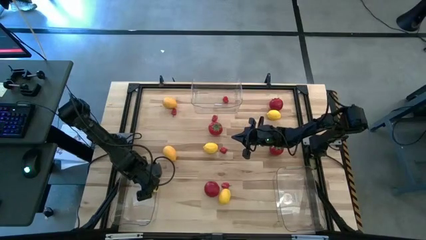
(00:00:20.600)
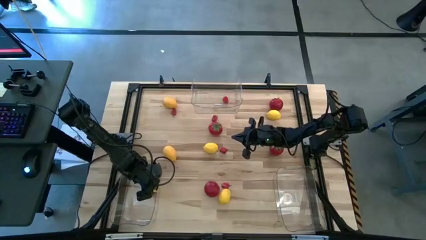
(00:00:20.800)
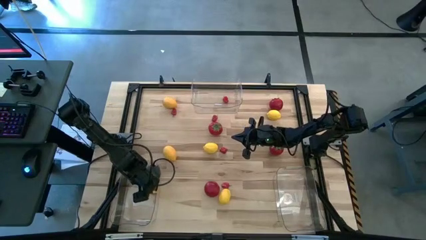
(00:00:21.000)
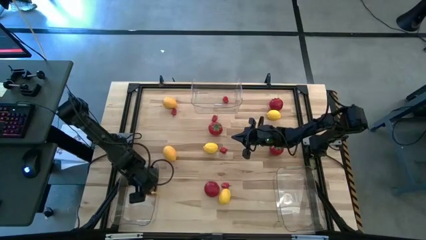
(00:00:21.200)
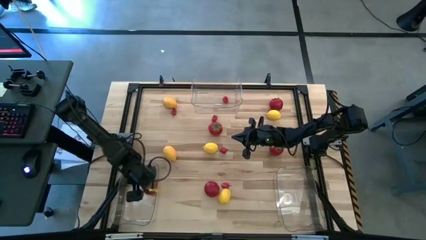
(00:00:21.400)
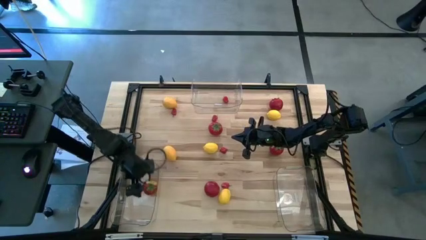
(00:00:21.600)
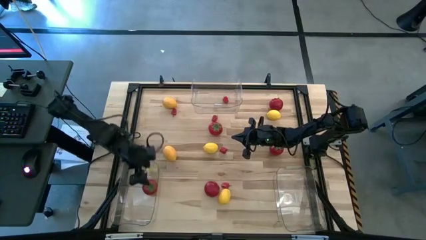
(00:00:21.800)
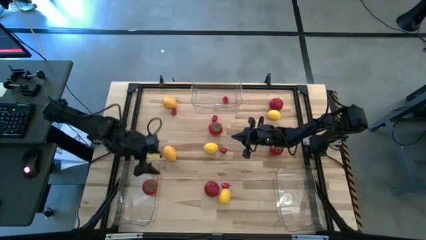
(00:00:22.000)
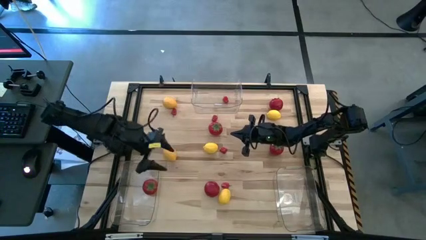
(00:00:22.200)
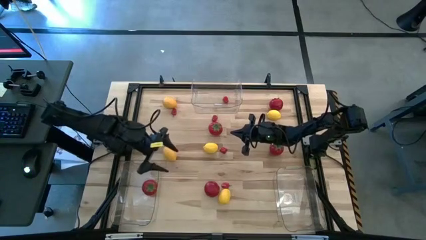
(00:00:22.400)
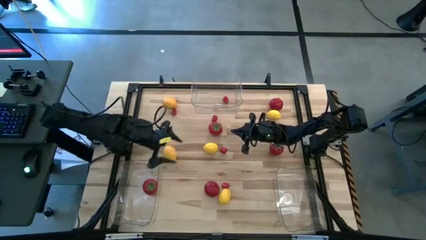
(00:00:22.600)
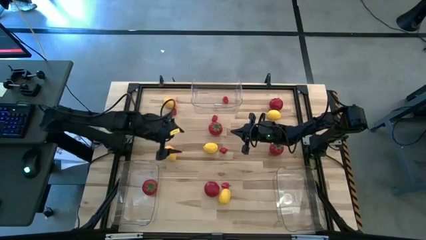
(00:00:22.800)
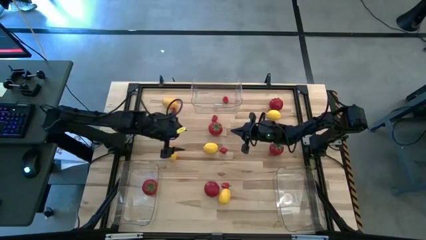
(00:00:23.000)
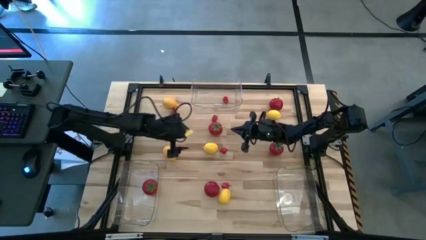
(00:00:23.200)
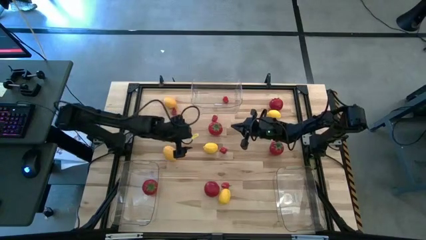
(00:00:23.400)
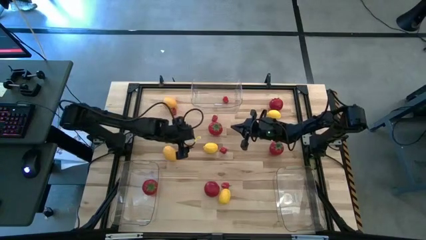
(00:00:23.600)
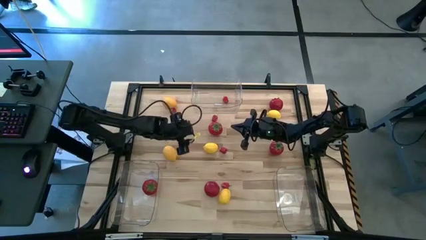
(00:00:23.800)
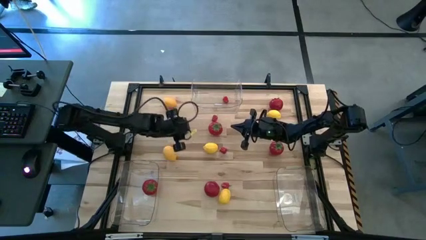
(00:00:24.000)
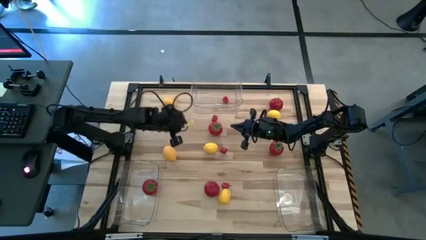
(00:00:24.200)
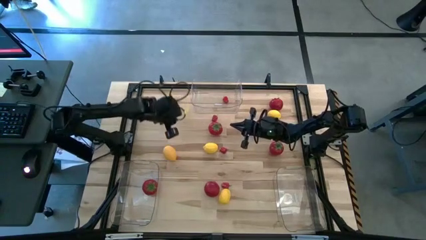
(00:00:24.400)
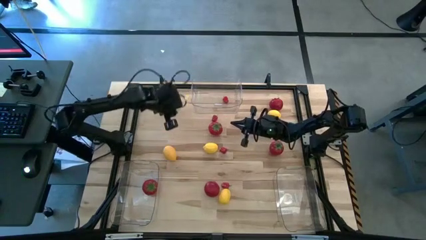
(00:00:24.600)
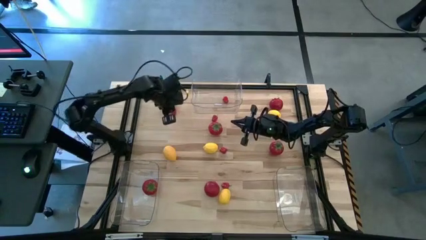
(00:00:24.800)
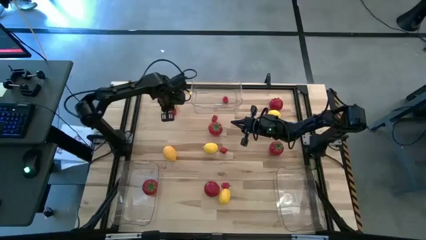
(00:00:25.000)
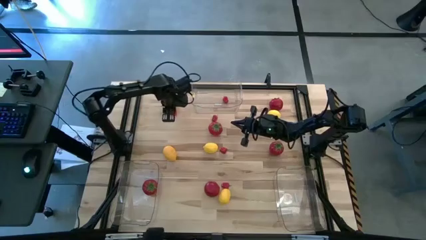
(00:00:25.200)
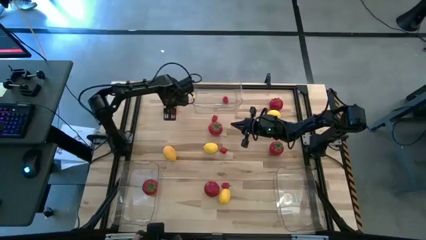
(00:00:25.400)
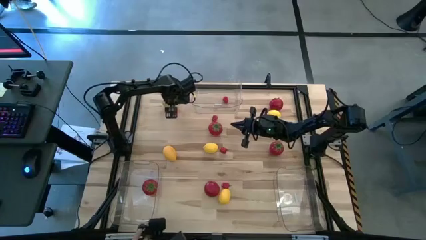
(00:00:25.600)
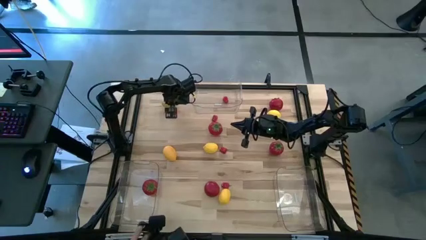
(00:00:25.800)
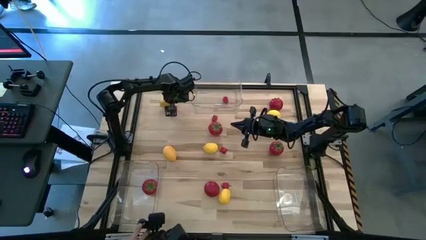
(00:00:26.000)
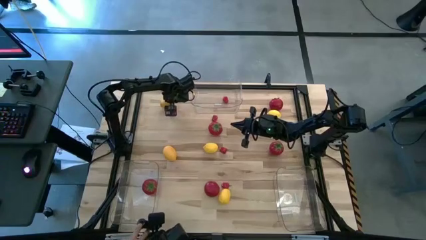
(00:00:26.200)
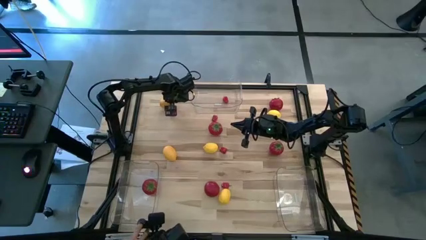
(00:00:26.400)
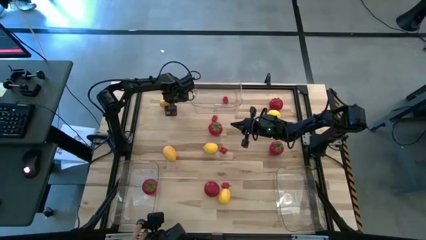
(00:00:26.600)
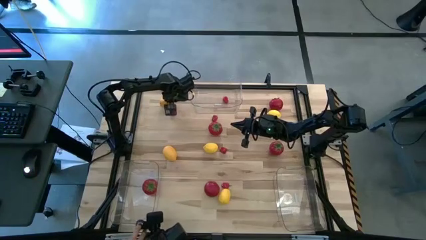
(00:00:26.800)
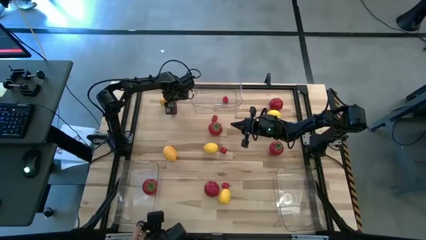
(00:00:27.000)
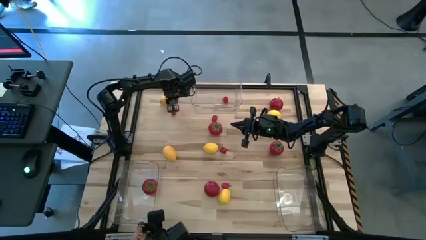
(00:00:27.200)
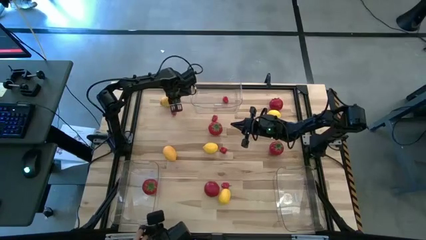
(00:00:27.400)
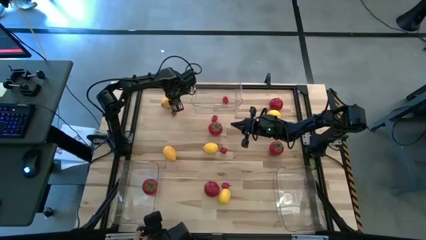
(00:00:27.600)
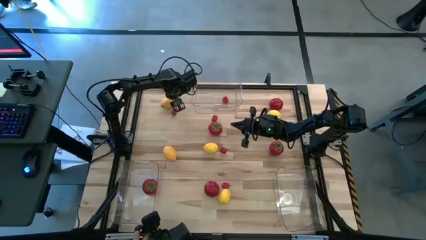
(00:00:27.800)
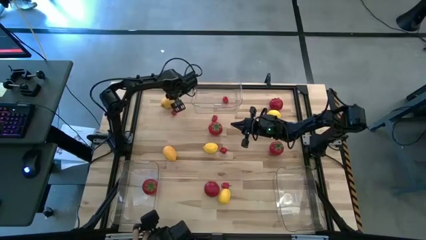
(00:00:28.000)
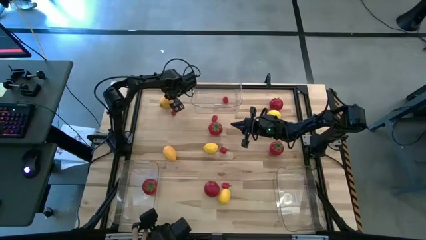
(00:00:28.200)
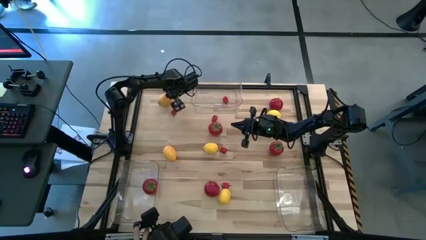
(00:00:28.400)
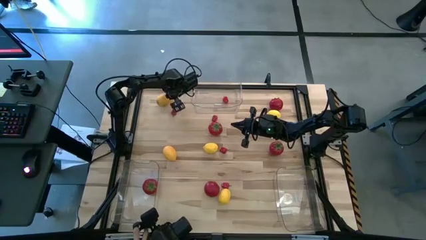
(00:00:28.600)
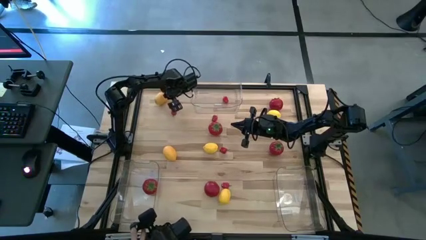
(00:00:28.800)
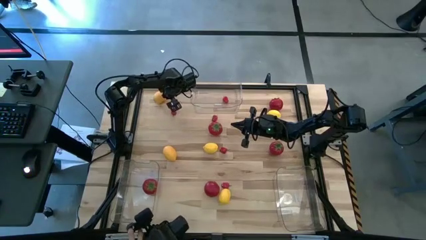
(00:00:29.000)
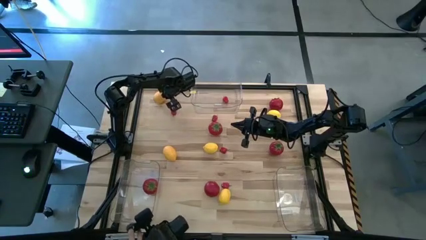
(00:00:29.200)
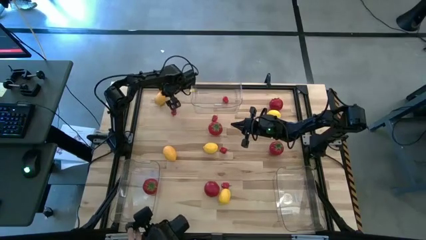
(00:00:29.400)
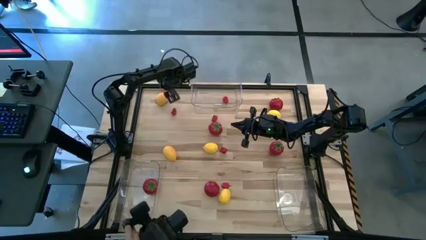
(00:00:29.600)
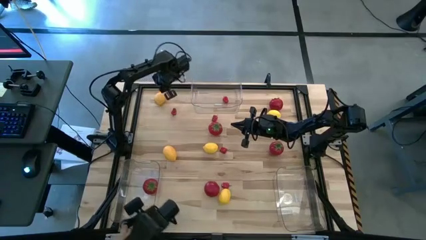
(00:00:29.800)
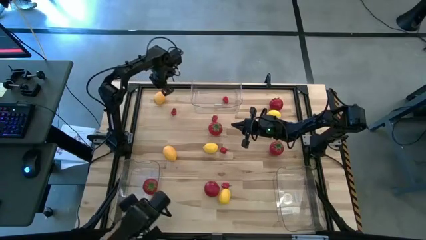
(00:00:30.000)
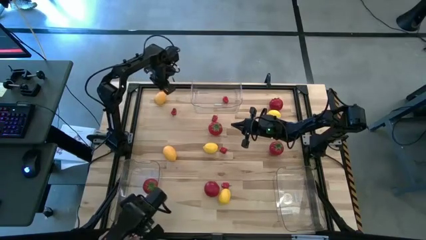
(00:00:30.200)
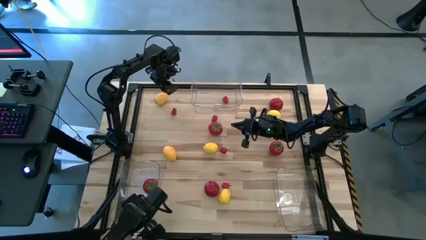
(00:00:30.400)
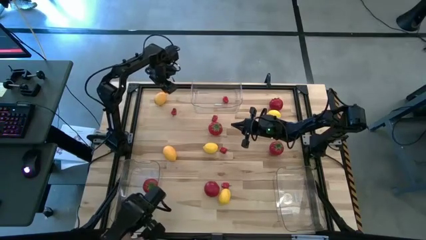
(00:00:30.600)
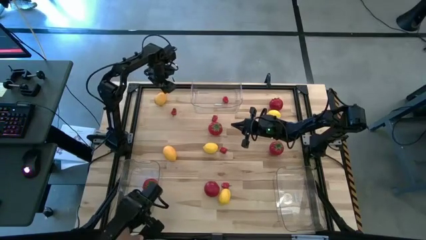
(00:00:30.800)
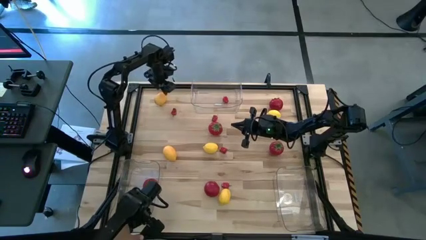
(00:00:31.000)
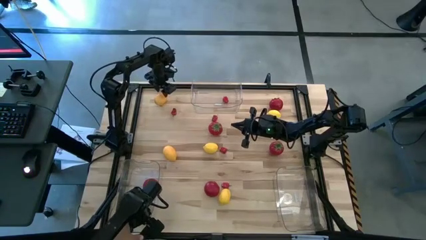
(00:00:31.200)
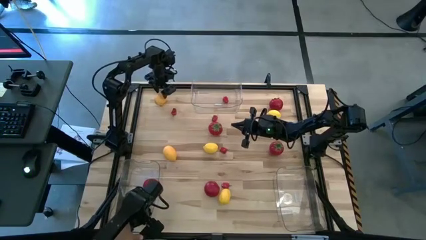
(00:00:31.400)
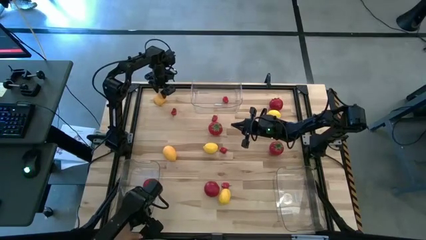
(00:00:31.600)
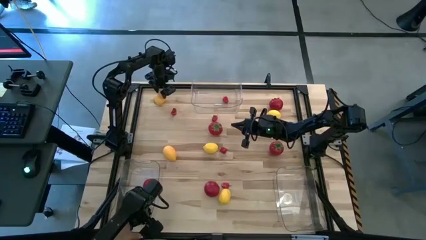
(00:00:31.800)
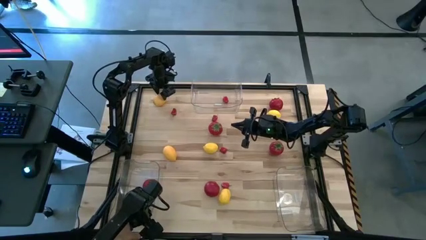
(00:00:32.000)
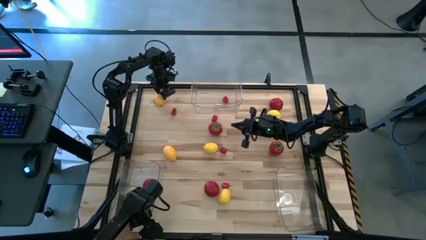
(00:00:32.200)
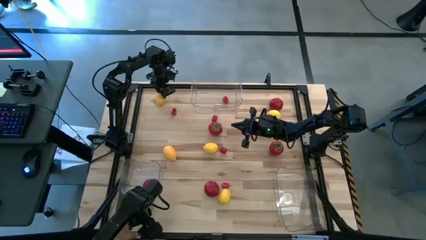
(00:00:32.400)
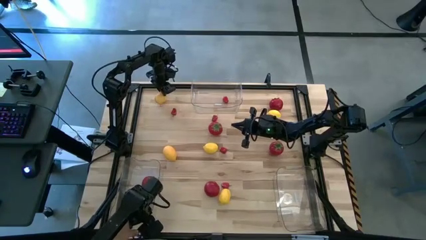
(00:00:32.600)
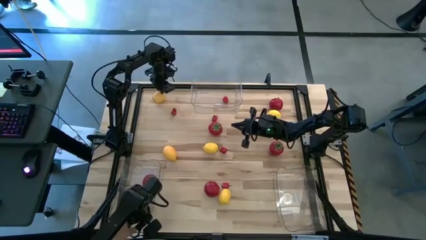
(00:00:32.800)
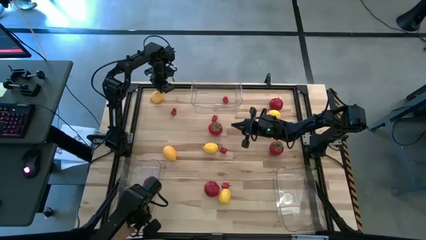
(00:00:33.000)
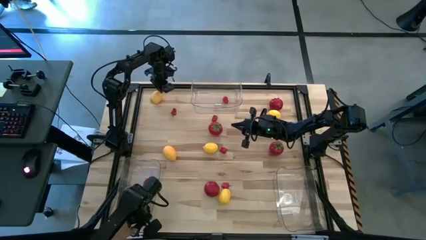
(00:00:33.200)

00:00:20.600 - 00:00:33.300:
Task: Sort produce into baskets
Put the yellow lemon into the bottom right transparent bin

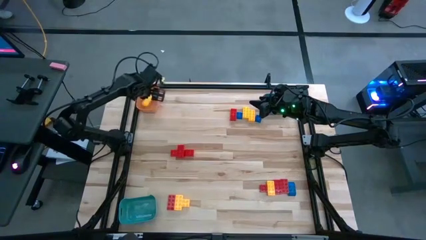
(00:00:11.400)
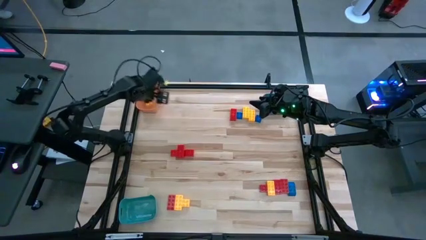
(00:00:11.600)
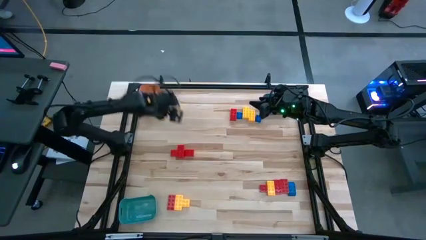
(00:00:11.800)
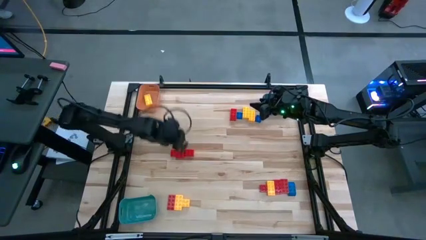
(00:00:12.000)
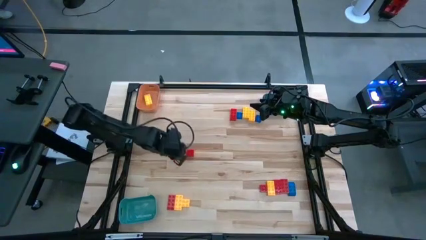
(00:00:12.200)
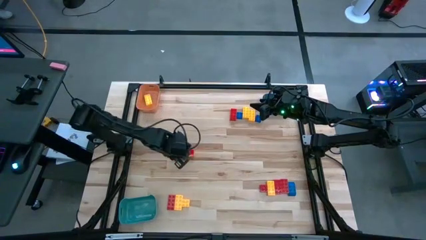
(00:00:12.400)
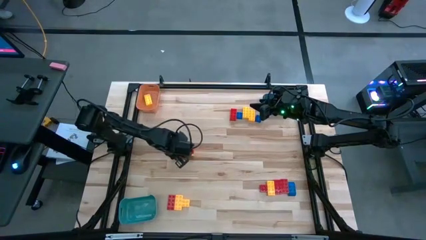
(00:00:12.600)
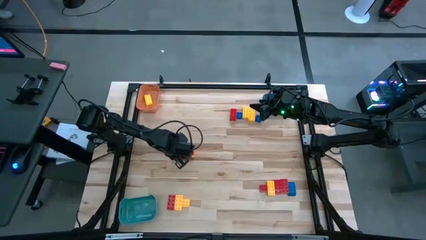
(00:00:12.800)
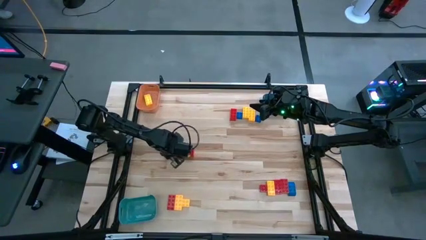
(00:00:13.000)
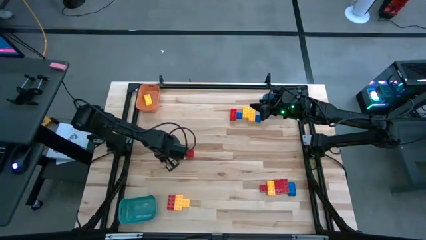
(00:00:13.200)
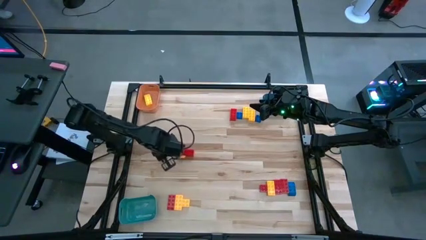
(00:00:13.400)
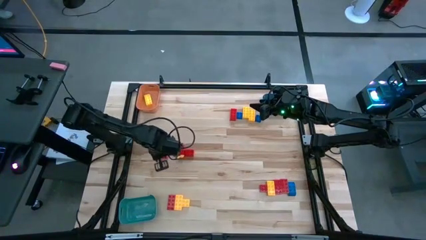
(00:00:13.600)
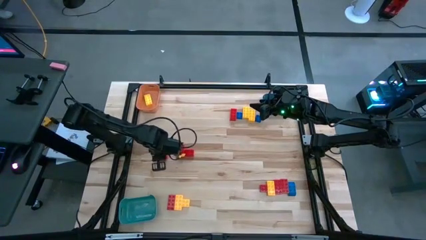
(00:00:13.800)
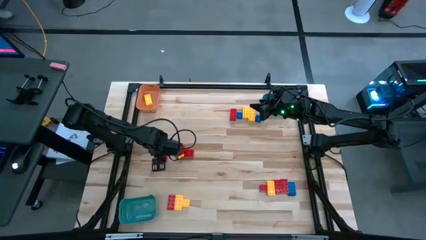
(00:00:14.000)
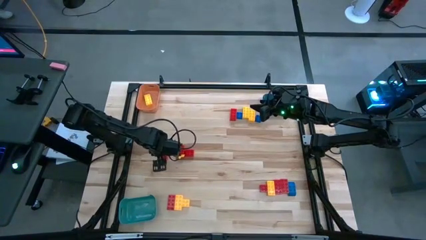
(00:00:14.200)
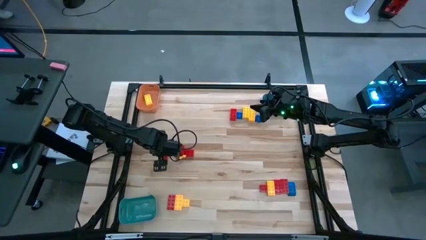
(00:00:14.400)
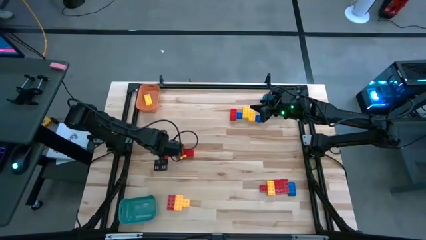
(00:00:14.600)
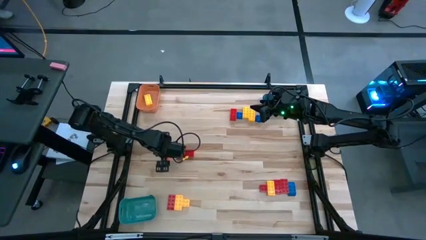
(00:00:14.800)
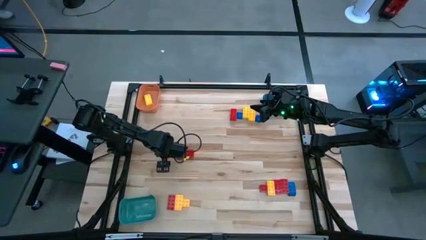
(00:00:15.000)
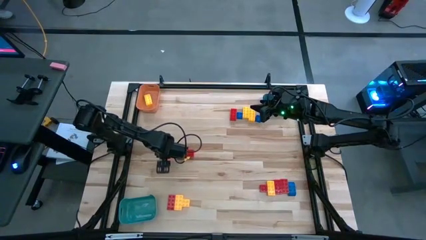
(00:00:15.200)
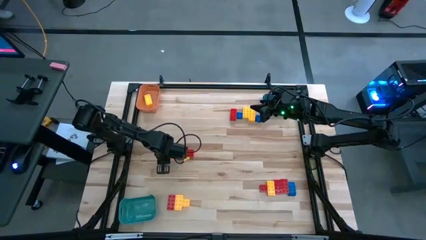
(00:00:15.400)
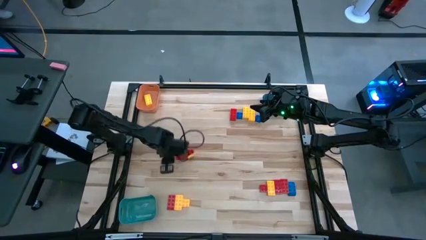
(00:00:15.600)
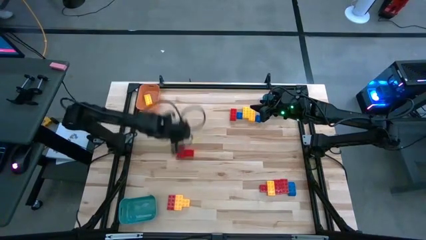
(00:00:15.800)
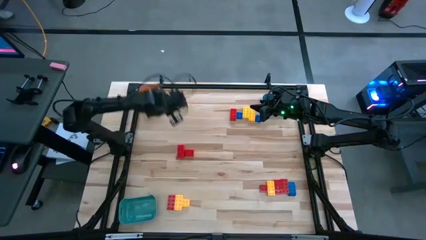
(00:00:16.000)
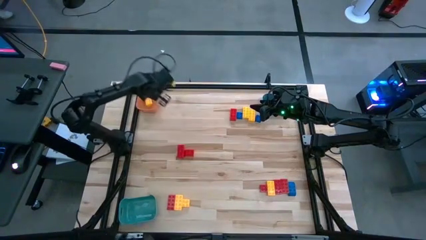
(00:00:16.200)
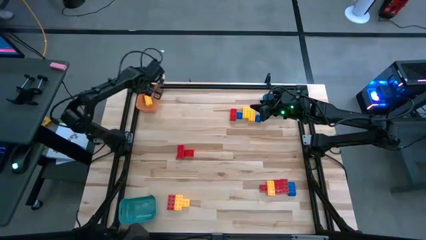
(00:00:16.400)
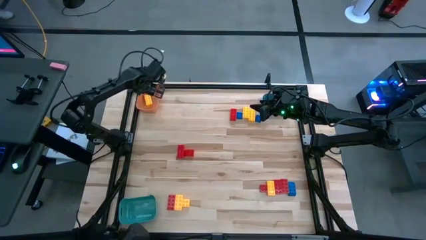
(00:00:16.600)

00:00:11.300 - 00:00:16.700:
Task: Sort blocks
Put the red game piece into the orange bin
